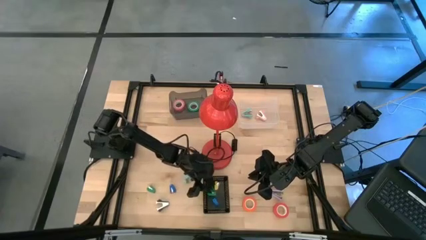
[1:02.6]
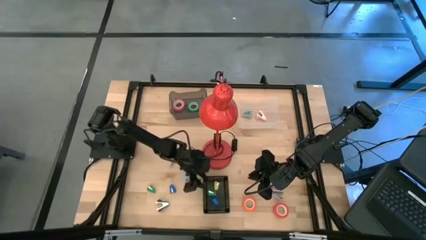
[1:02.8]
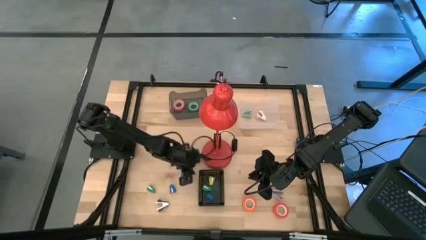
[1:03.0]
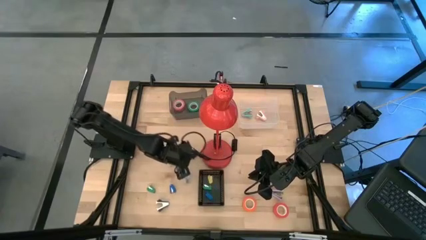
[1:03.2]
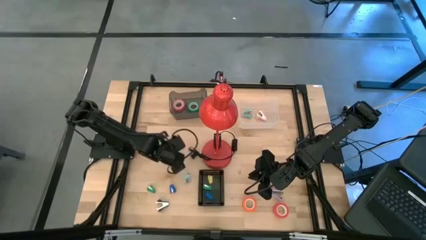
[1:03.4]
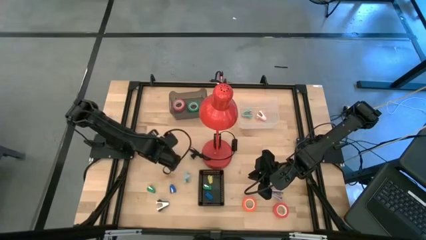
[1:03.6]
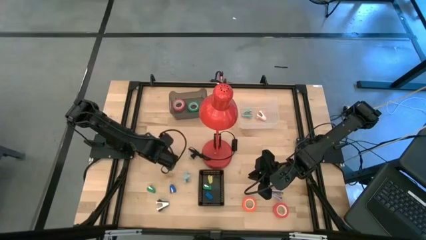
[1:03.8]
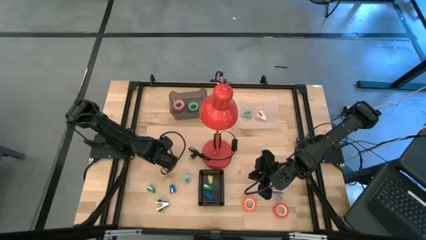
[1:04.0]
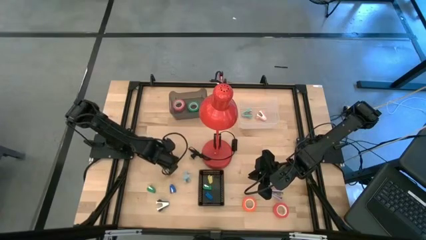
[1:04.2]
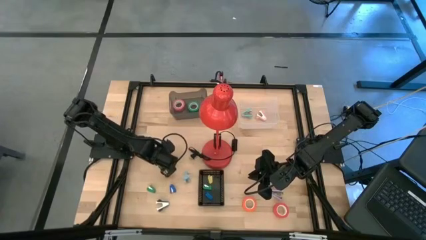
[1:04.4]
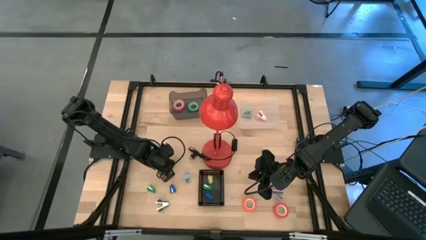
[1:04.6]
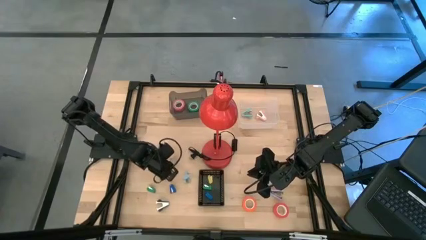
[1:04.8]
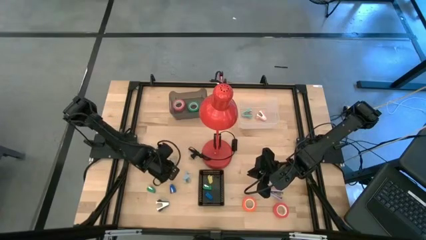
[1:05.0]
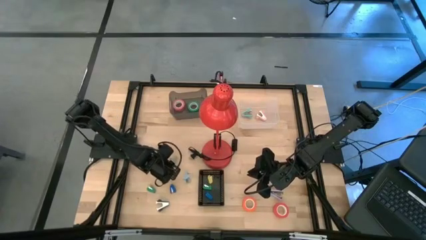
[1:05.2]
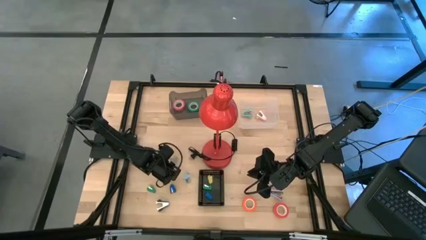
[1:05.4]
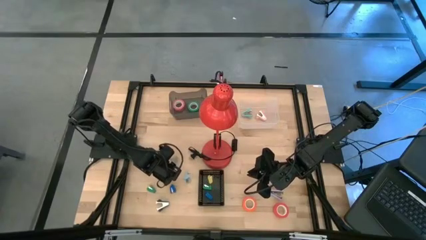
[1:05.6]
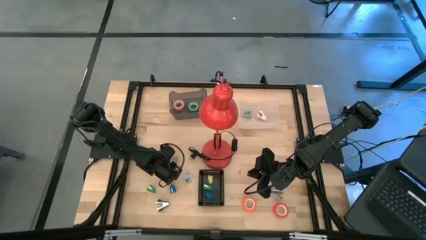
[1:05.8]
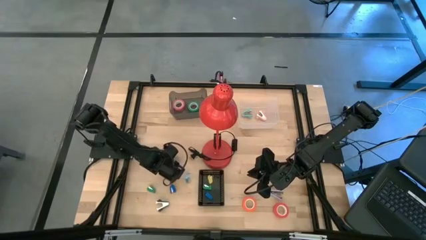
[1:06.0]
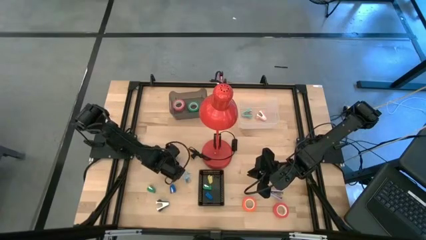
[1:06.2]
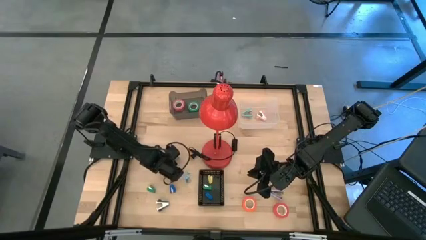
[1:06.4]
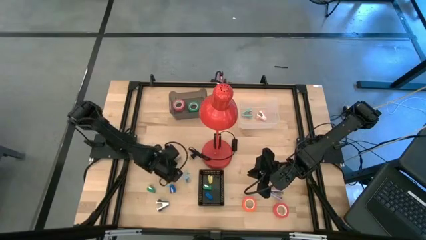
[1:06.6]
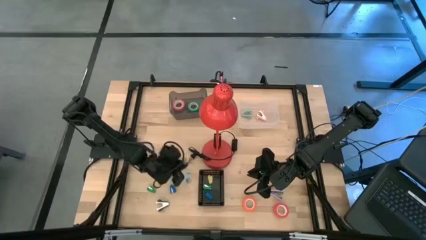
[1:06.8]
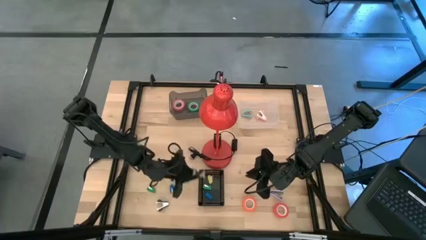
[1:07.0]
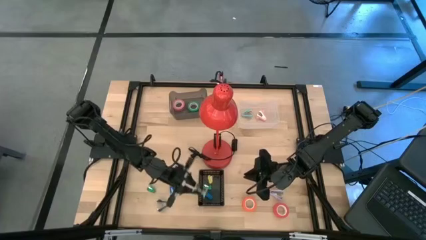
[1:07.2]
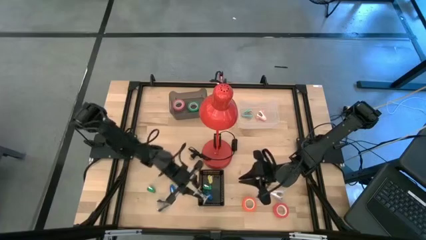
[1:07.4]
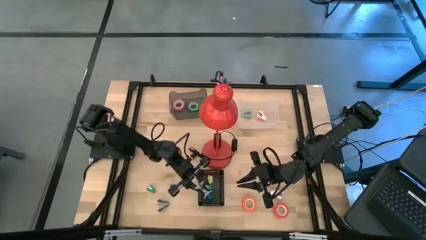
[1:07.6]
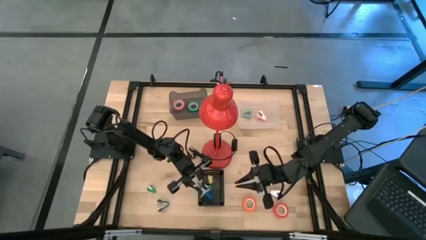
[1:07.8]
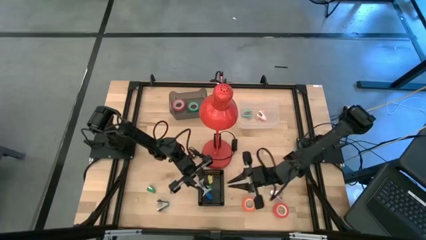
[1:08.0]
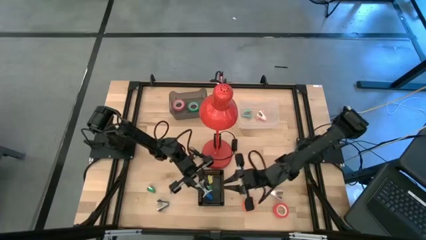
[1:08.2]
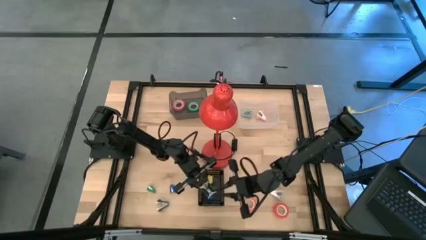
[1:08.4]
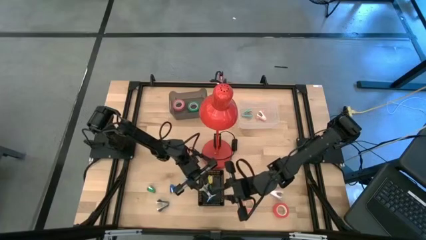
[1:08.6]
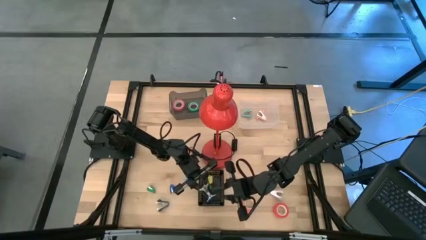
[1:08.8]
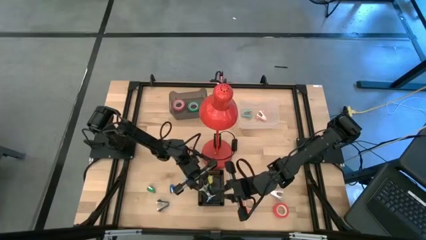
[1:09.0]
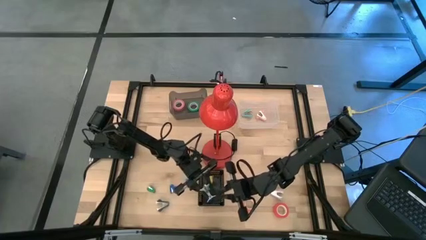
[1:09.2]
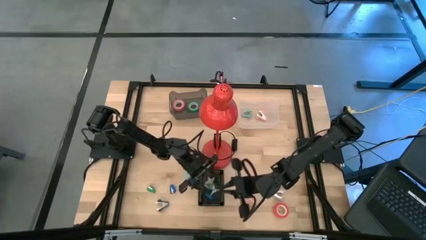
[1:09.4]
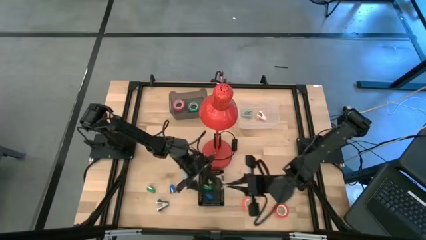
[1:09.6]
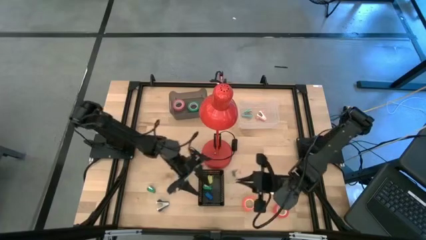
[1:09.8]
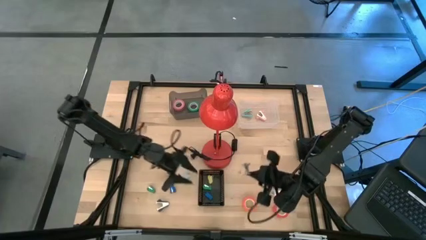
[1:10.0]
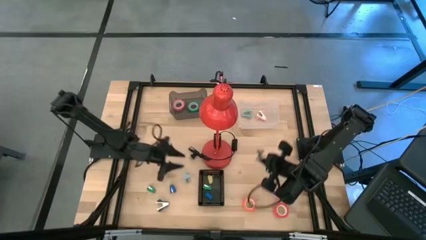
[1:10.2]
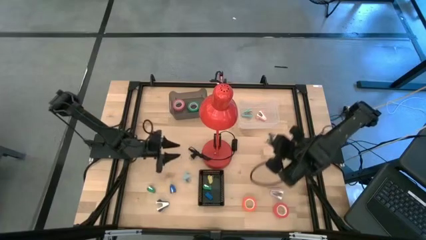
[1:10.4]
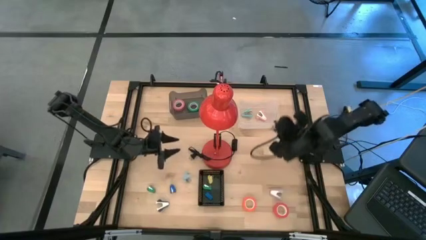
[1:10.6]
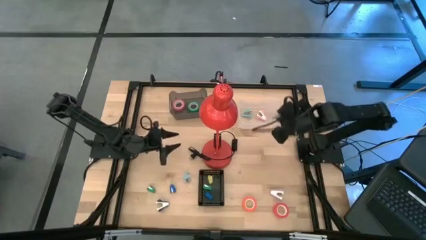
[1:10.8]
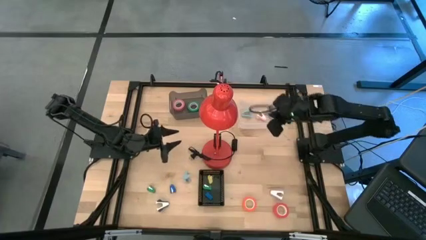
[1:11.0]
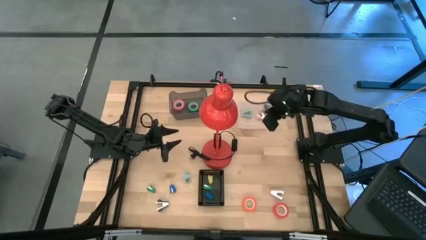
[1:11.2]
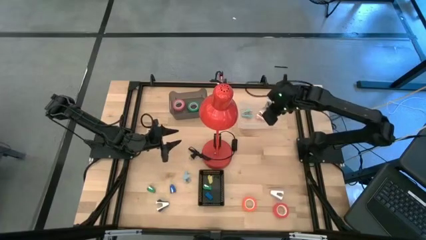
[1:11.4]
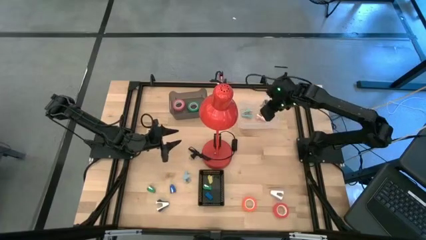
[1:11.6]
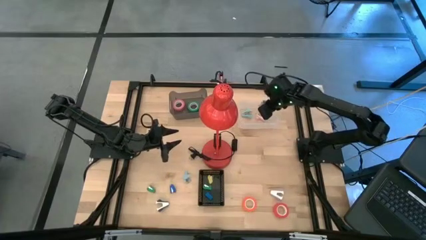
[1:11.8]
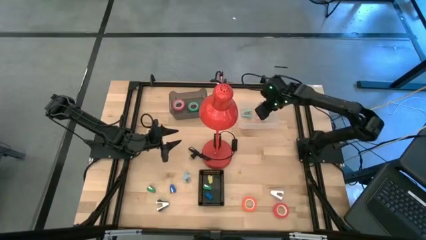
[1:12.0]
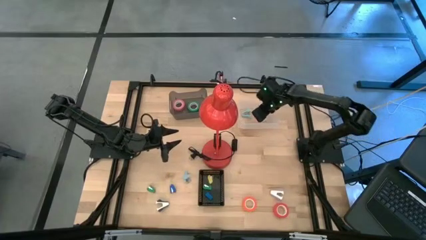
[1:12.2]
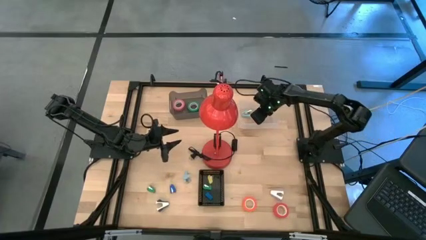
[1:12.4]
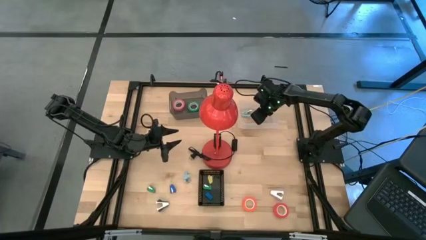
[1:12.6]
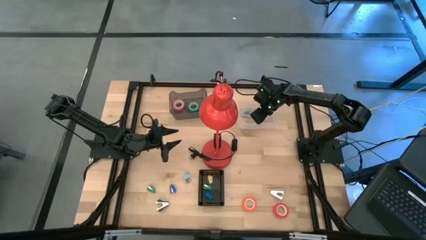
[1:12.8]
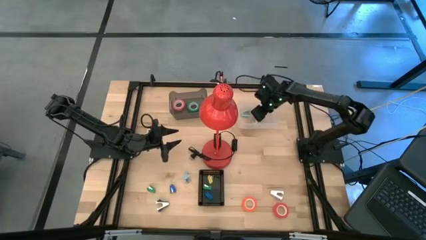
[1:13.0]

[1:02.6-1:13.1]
Task: Pick and place Stapler, Stapler remover, tape
Put the green staple remover into the transparent bin
